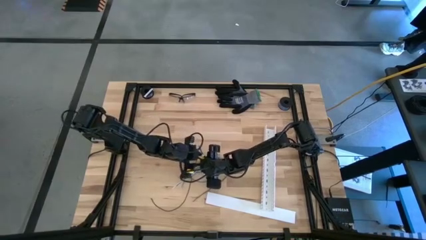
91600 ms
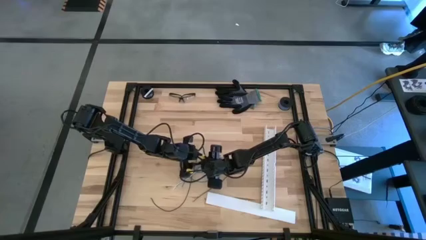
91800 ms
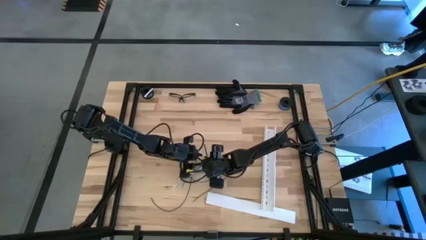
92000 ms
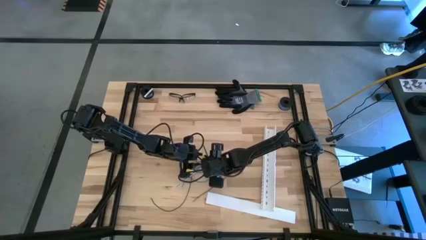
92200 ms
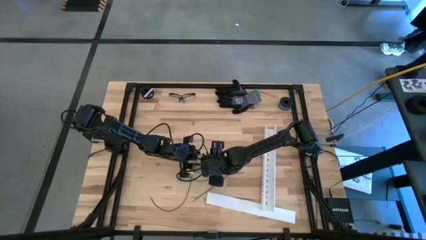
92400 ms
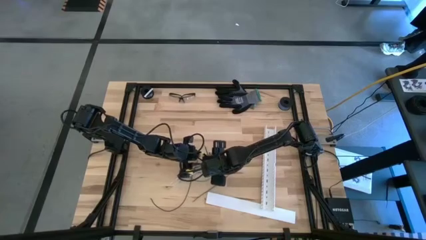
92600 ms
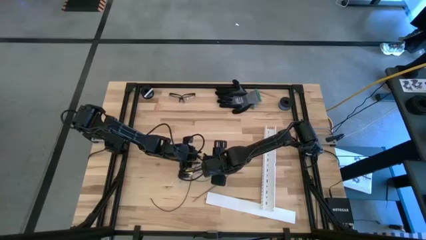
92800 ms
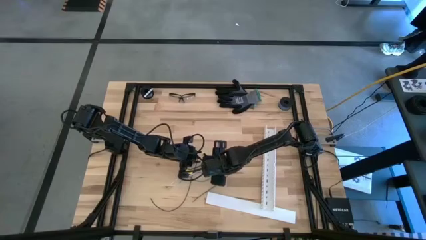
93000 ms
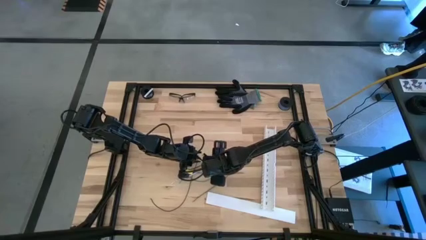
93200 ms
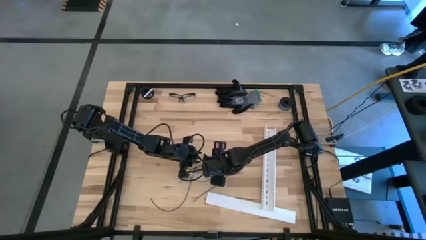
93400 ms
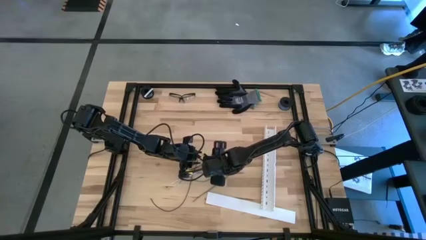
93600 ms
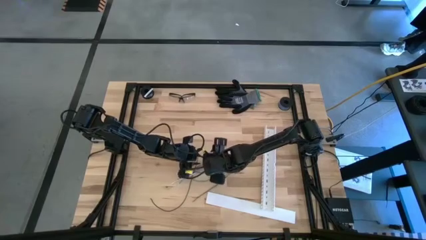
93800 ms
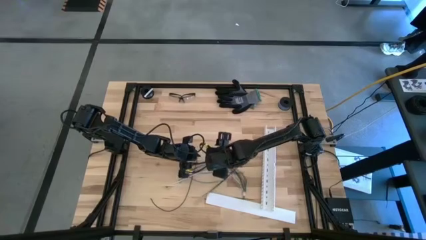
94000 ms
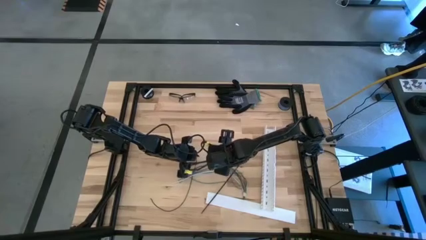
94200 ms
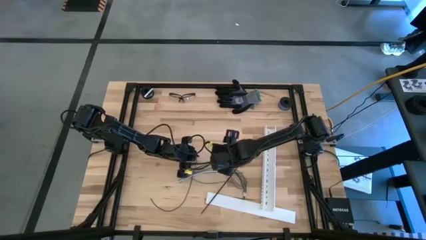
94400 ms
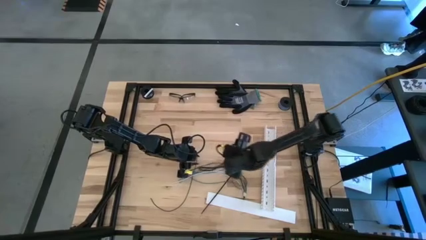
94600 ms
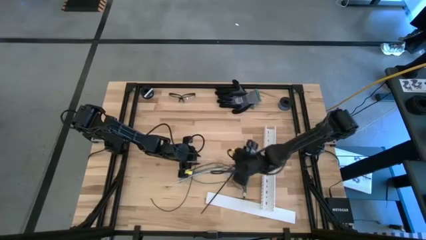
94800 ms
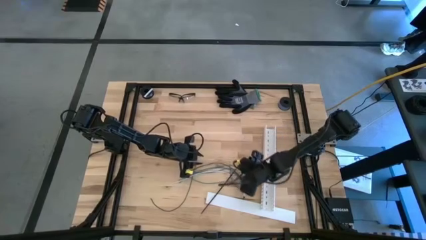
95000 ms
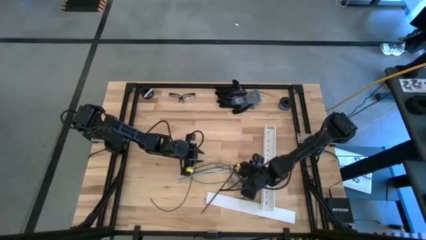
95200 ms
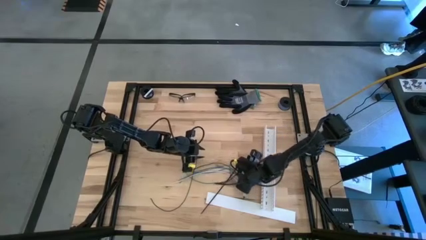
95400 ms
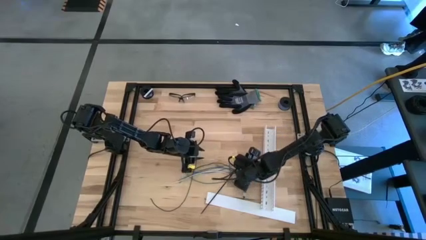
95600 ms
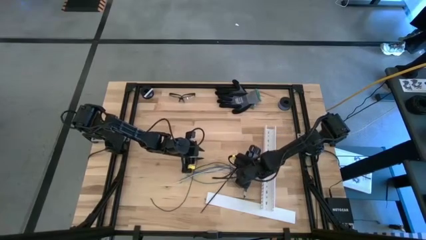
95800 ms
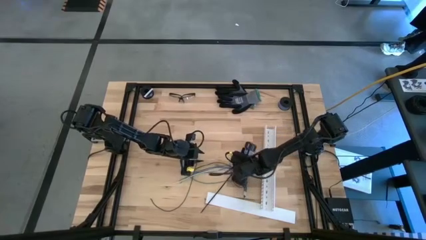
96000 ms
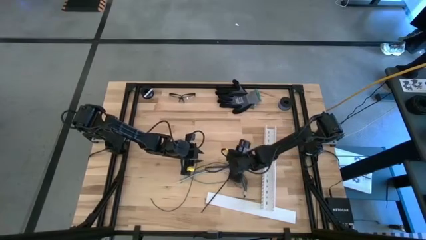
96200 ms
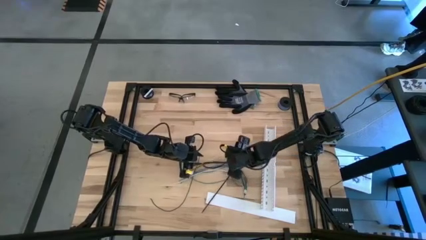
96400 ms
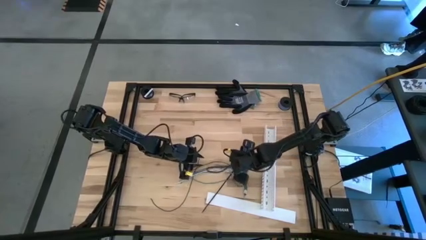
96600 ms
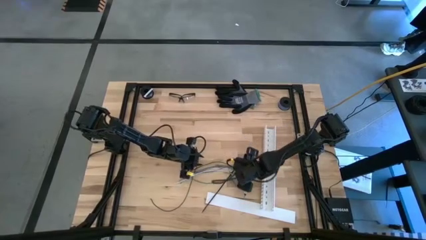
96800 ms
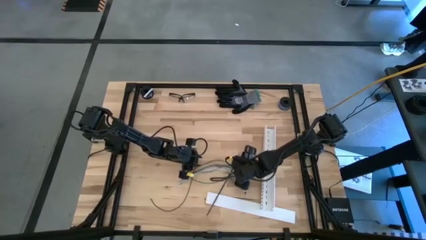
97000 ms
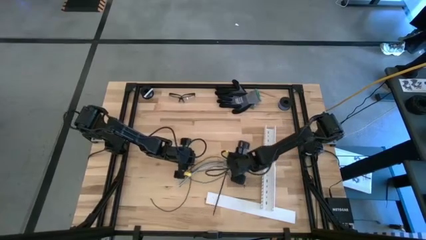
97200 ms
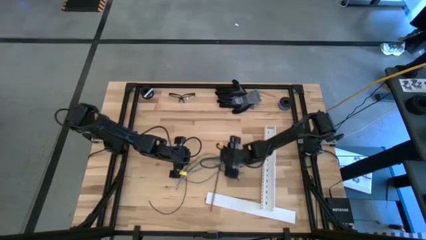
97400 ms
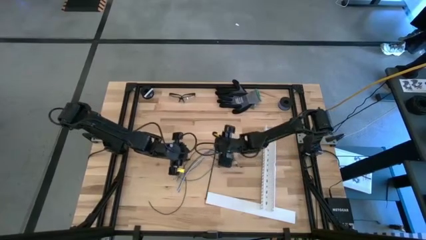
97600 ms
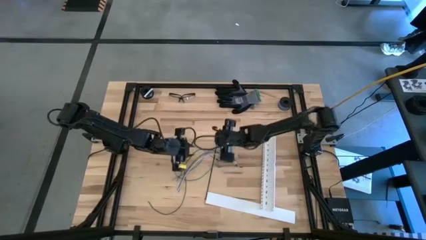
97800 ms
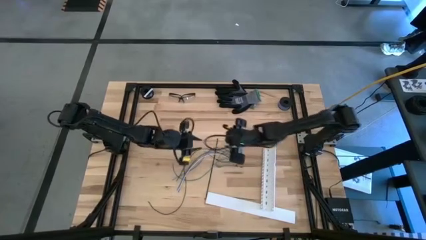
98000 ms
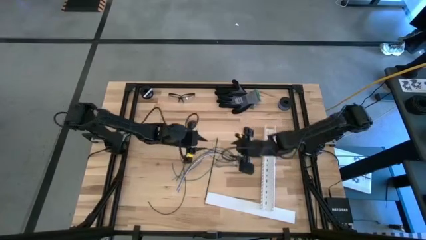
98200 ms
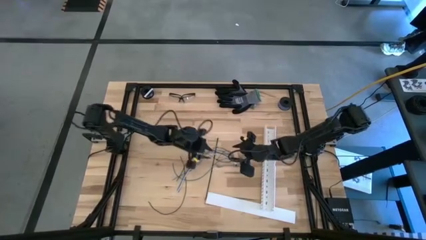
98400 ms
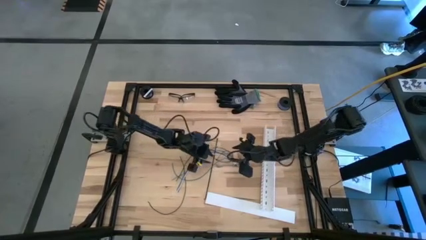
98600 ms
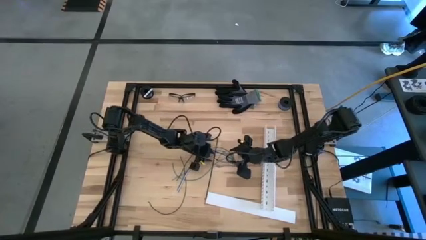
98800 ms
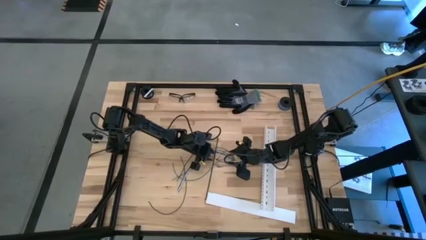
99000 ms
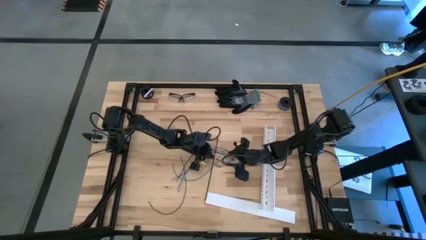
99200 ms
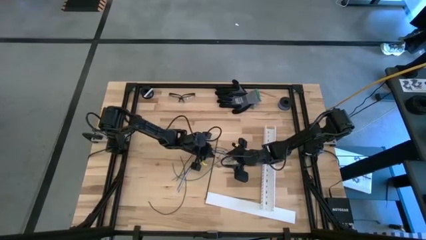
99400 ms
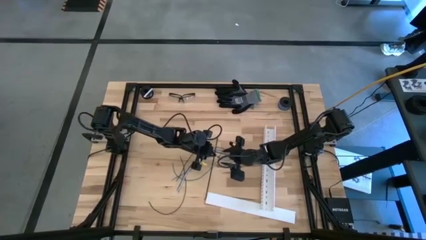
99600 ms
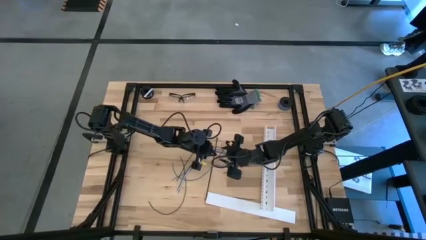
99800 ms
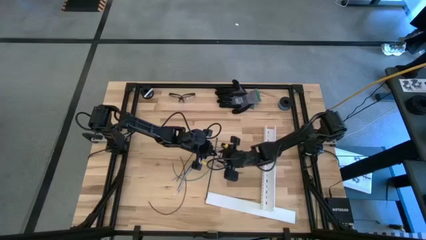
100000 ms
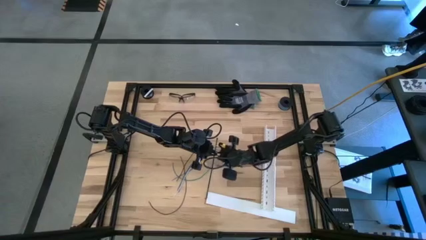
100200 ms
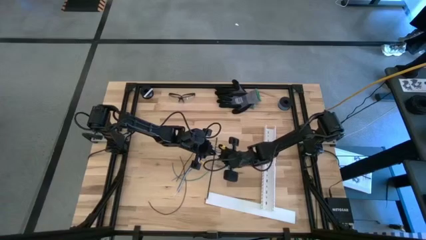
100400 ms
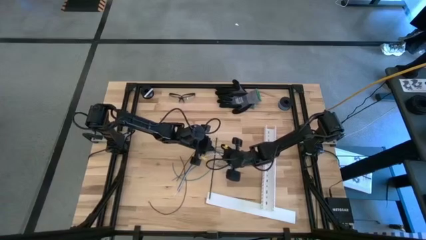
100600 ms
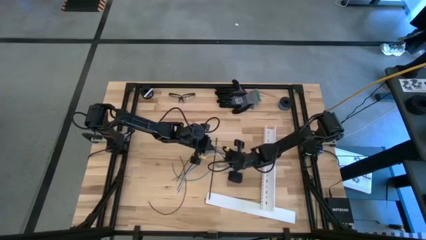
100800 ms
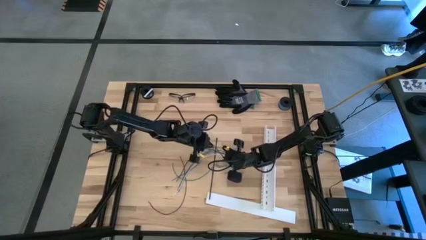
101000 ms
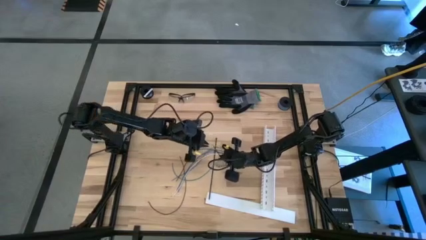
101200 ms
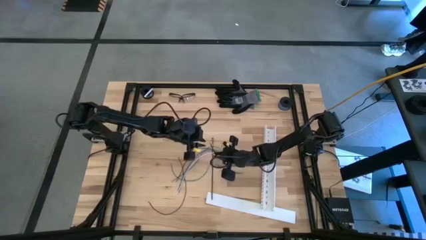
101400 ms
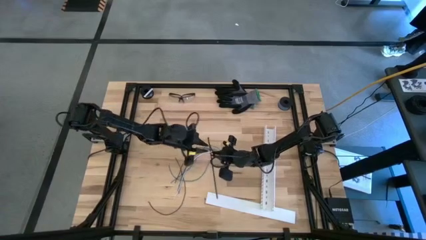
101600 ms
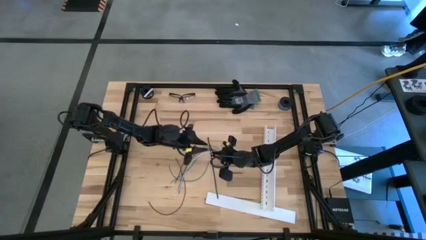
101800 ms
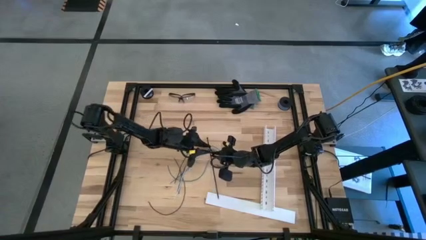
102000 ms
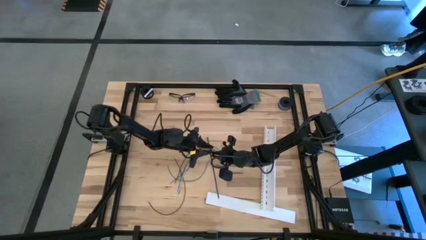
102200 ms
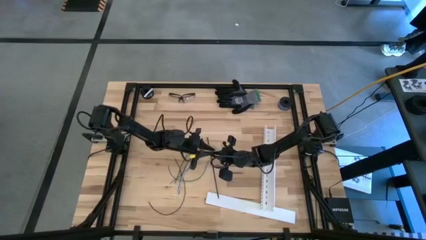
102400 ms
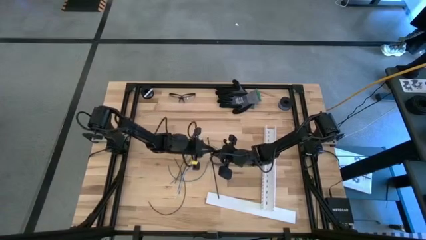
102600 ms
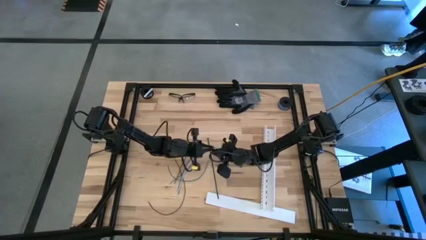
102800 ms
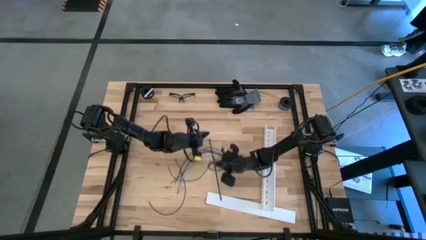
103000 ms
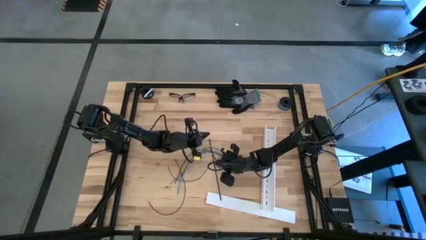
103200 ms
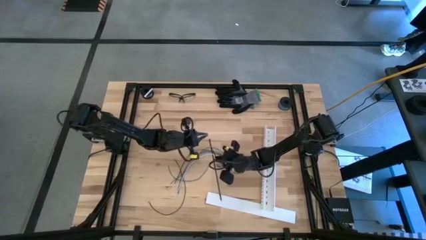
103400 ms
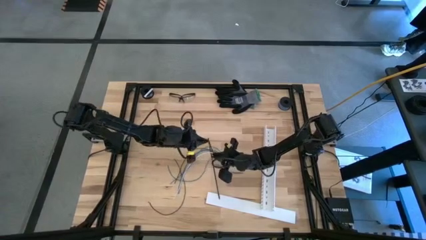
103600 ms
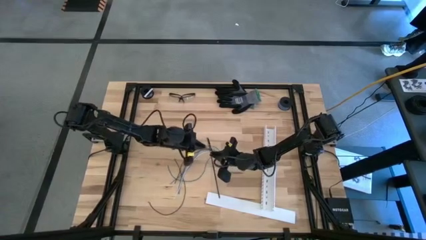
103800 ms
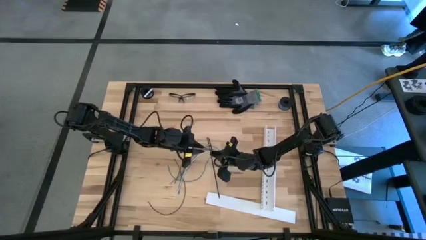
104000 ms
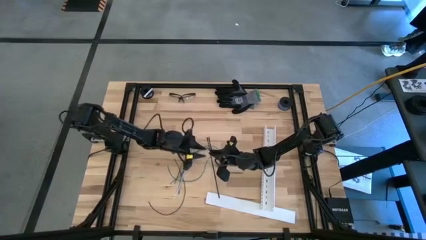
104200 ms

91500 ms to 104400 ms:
Task: Ziptie cables
Wrap the cable wires with the black zip tie

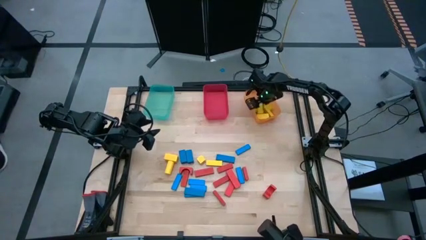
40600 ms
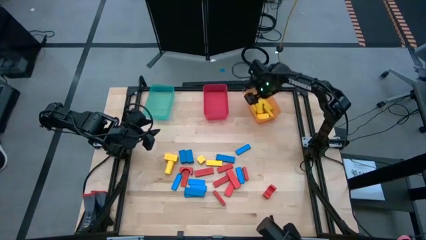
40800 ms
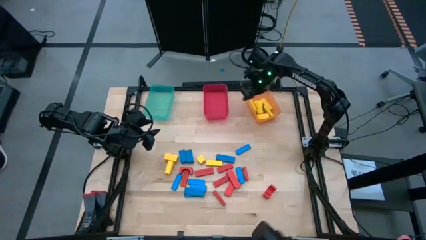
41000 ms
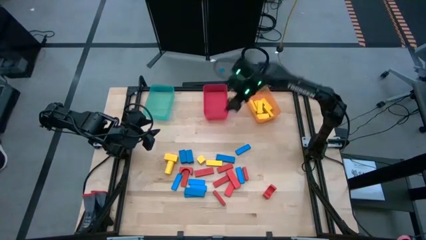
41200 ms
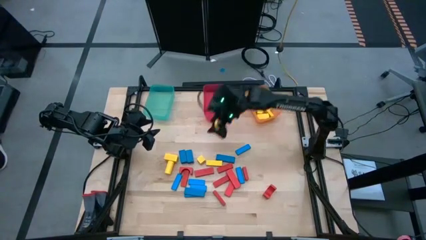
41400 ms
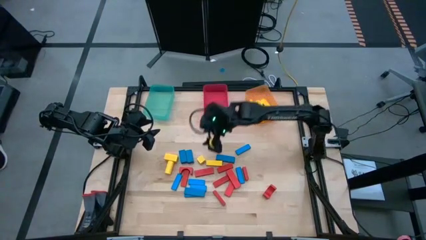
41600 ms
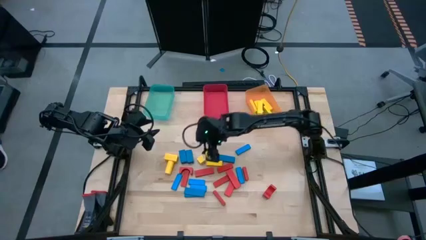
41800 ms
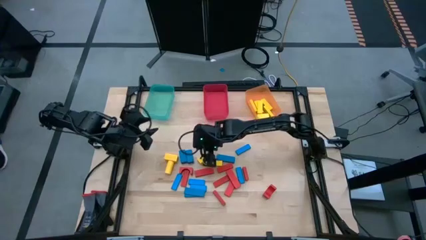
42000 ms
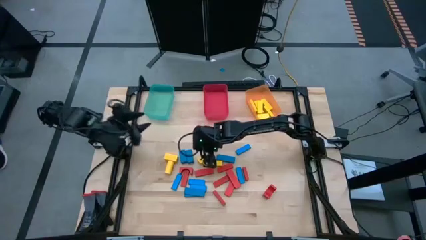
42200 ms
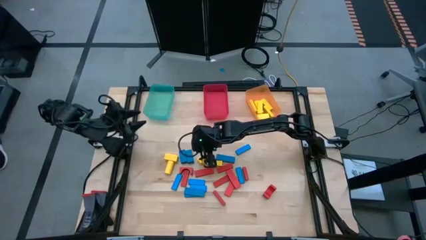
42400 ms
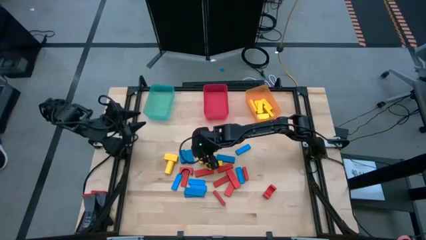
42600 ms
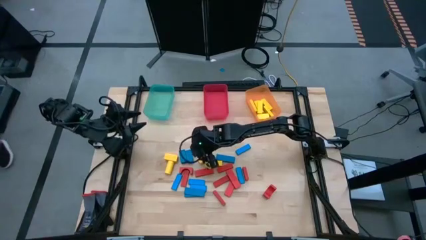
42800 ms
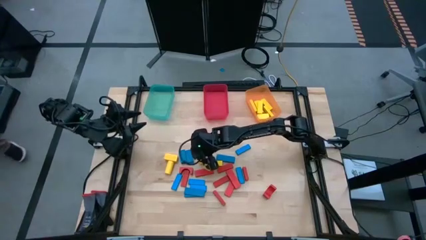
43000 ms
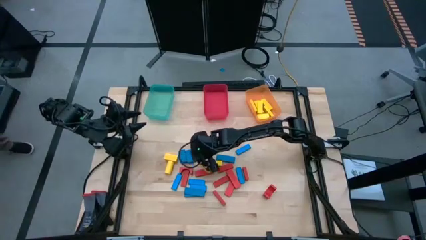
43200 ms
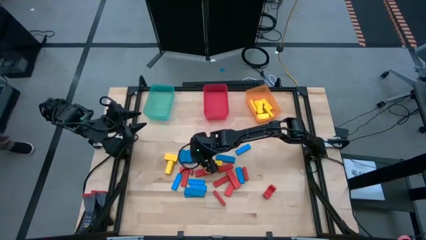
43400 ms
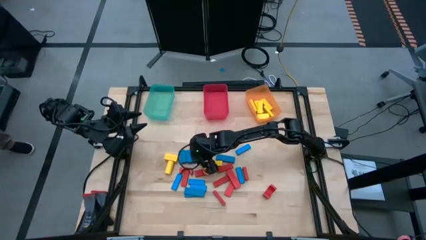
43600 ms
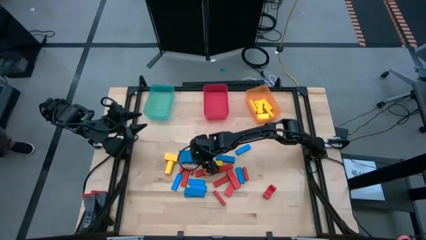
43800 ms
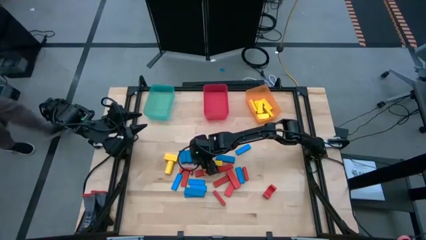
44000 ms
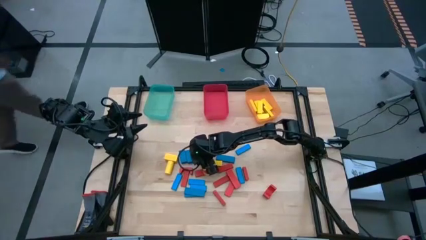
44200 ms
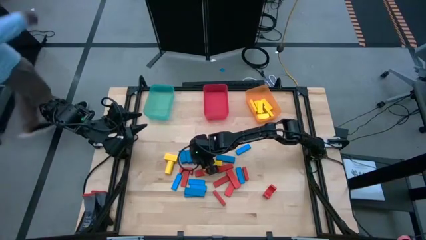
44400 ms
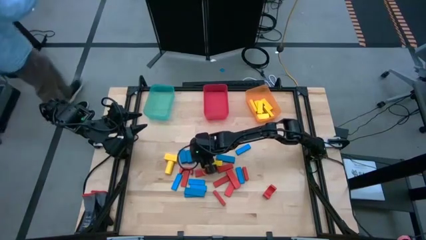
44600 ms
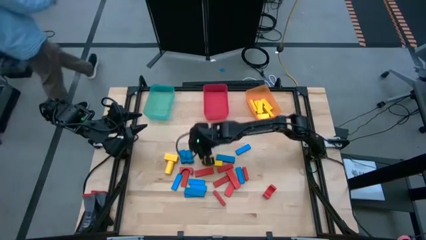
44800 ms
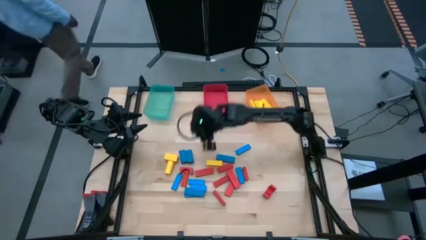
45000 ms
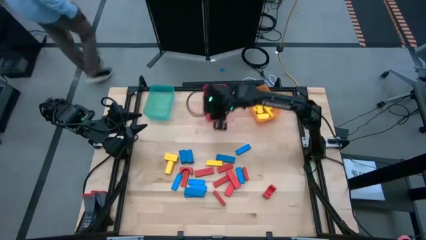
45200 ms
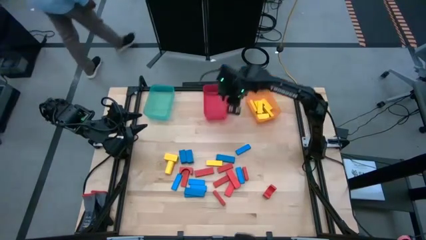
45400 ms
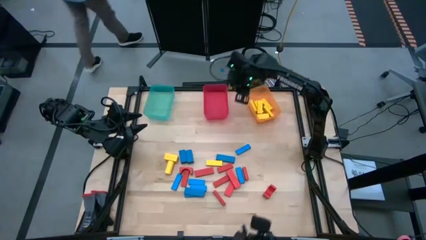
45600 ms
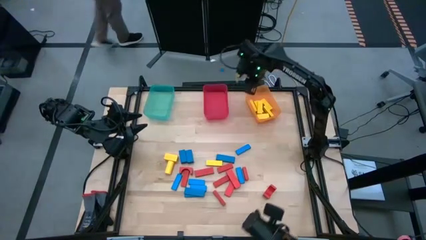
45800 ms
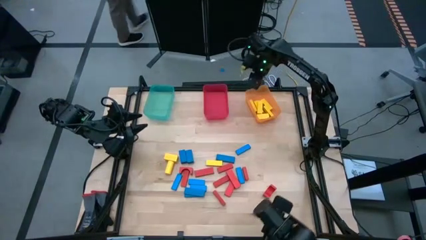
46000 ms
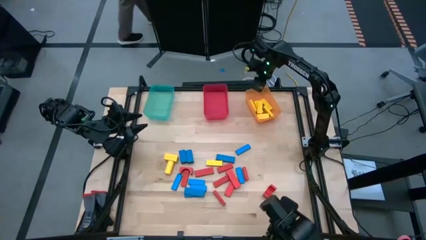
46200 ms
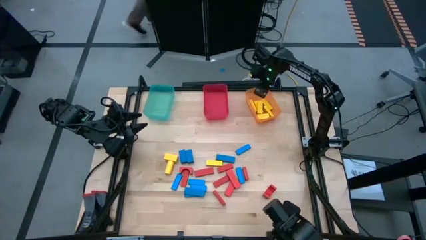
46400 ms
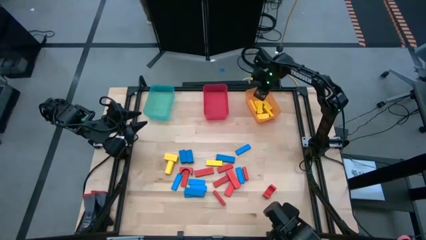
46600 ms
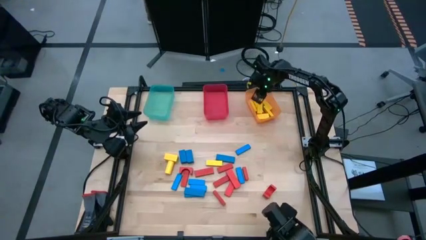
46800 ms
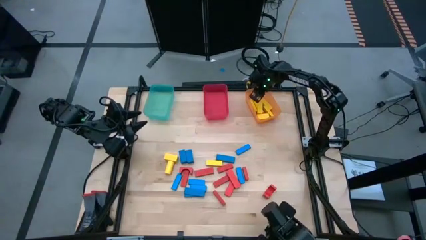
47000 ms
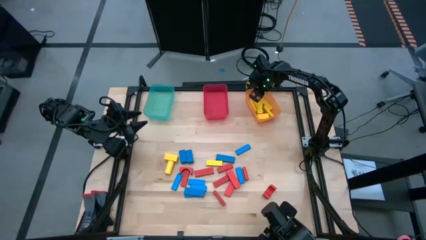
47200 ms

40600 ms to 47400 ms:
Task: Sort blocks
Put the yellow block into the orange bin
